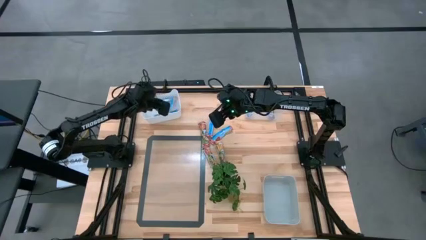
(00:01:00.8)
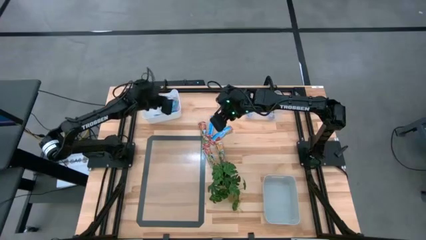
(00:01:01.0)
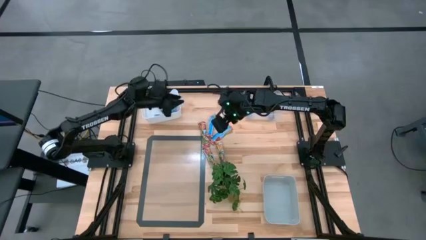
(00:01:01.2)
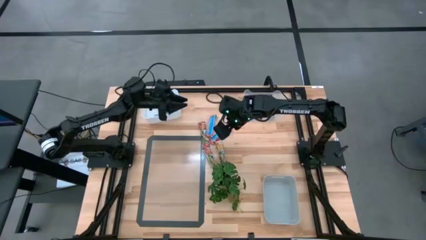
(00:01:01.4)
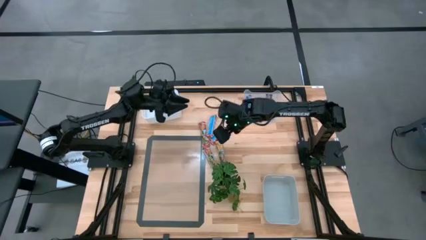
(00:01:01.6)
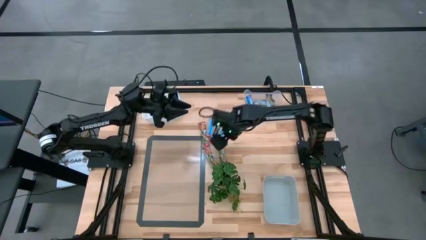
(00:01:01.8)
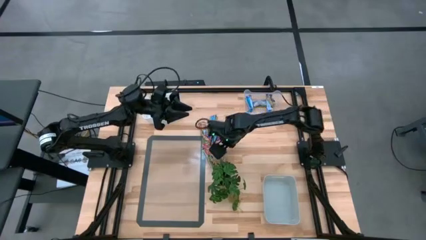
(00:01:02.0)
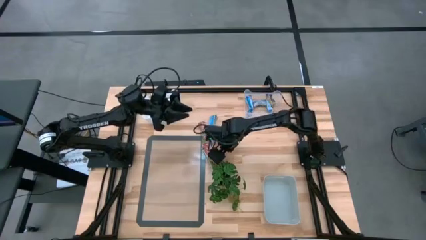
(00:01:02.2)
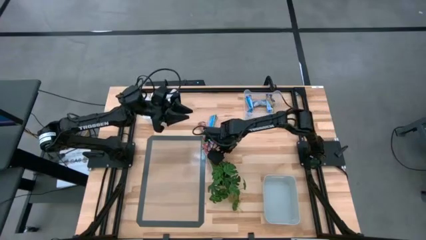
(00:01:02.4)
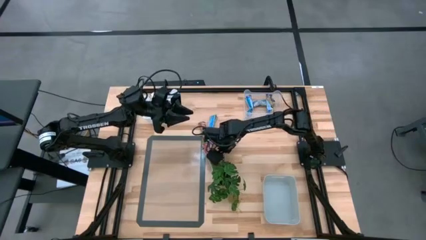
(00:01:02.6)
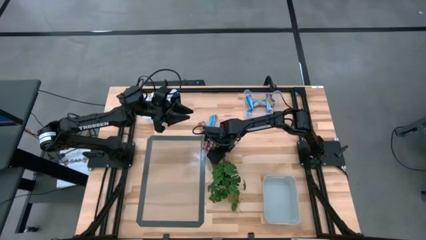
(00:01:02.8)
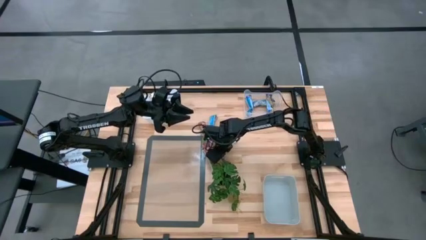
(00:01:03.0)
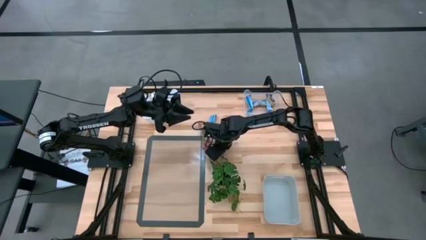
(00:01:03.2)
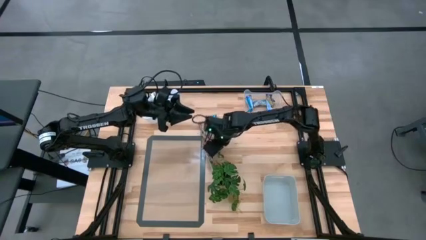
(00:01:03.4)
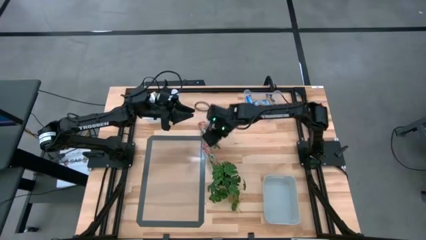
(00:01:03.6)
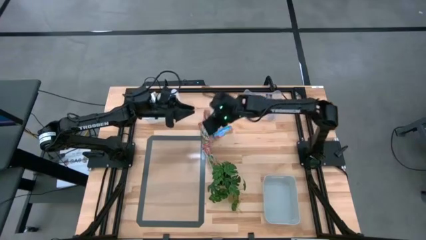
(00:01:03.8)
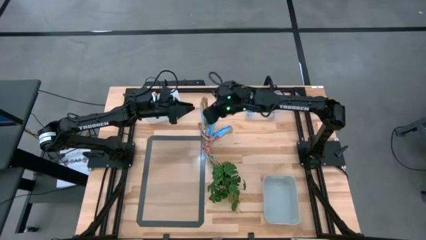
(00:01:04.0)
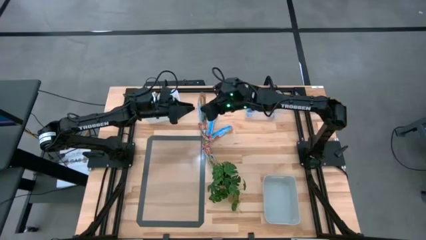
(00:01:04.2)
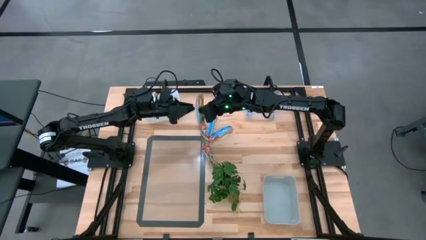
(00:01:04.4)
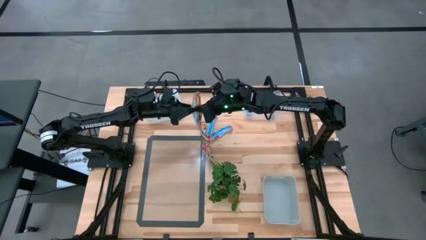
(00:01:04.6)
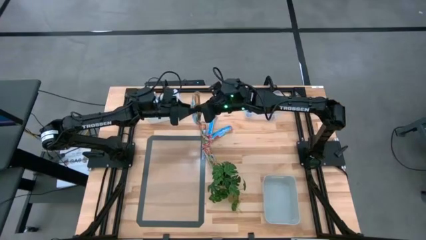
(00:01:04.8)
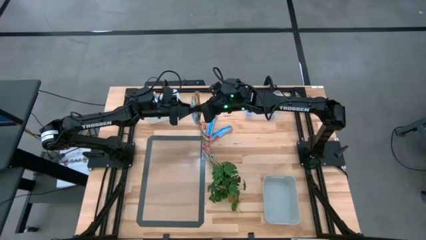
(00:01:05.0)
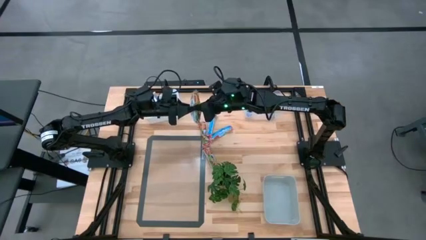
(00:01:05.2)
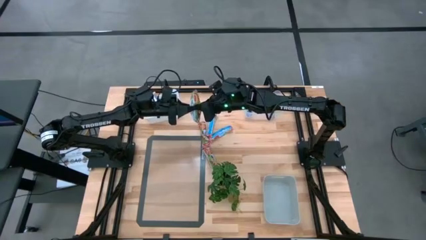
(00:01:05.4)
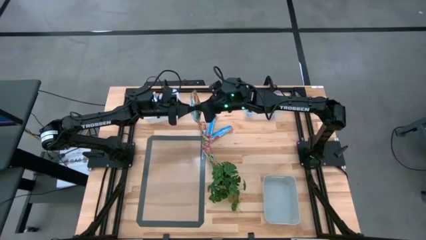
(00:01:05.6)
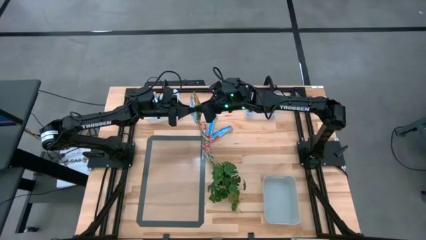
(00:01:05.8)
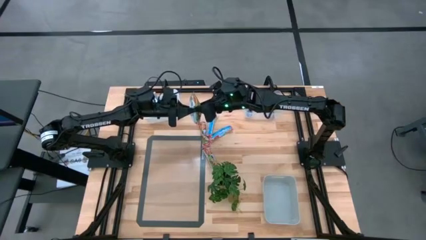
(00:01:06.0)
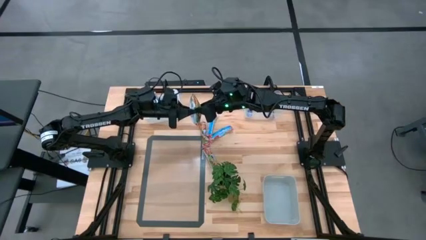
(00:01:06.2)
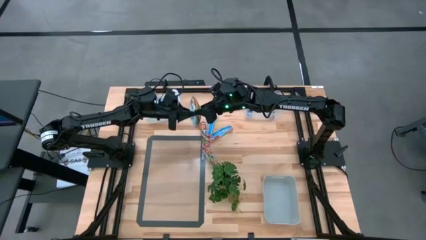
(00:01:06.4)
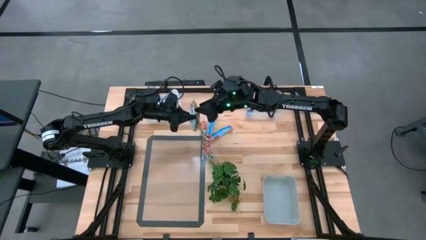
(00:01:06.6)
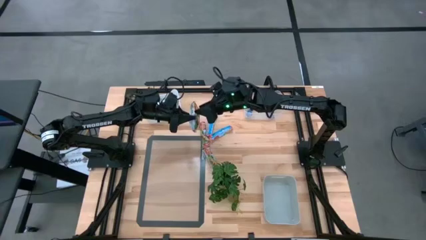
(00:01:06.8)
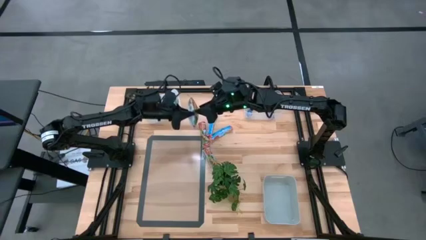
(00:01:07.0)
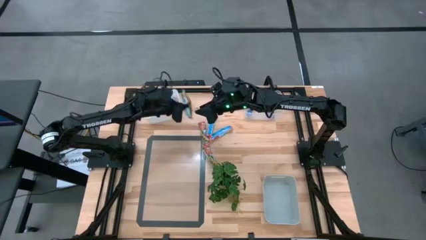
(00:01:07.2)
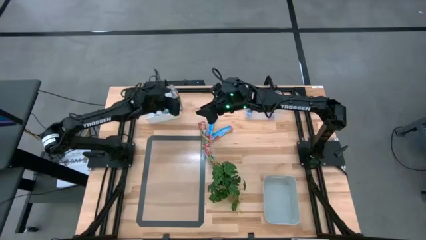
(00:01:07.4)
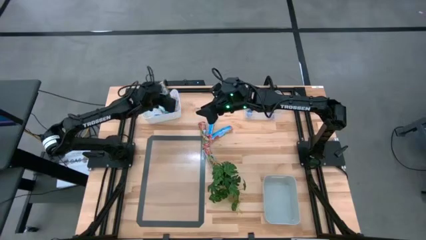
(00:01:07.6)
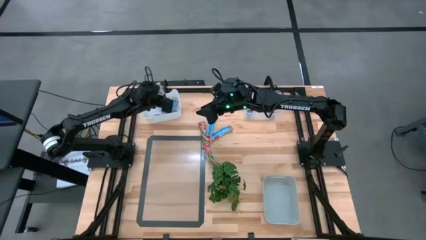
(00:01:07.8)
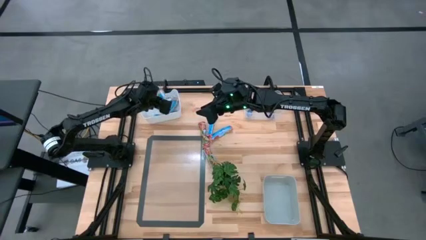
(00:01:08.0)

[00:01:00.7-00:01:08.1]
Task: Pick and place Granola Bars by type
Put the yellow granola bar into the white bin

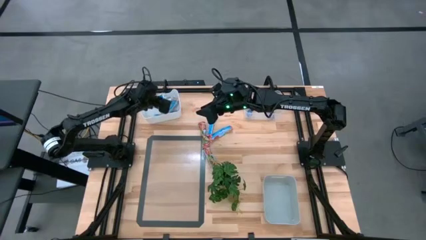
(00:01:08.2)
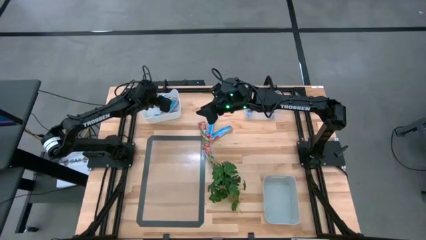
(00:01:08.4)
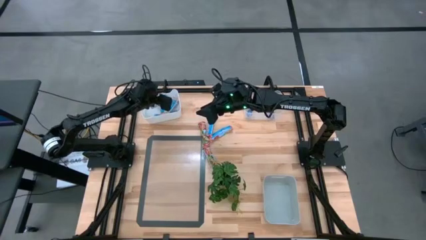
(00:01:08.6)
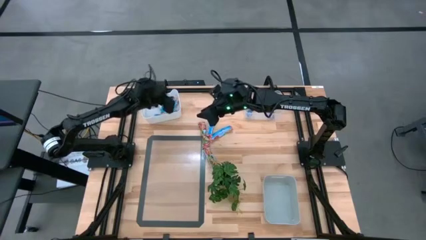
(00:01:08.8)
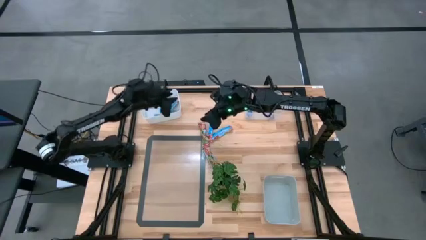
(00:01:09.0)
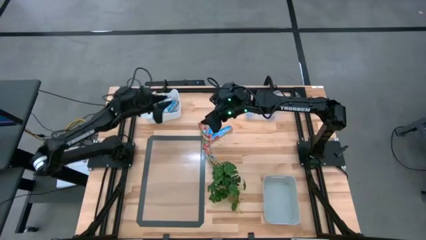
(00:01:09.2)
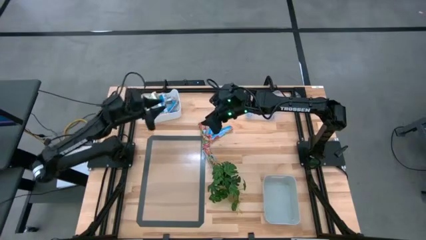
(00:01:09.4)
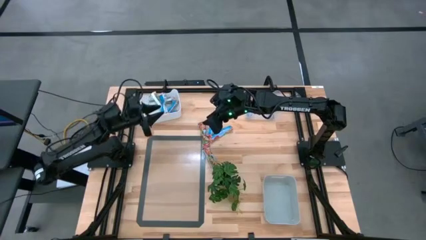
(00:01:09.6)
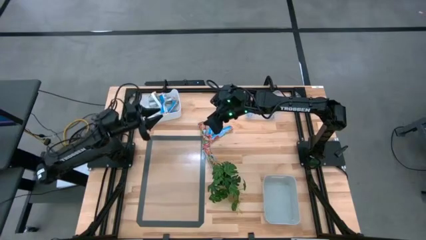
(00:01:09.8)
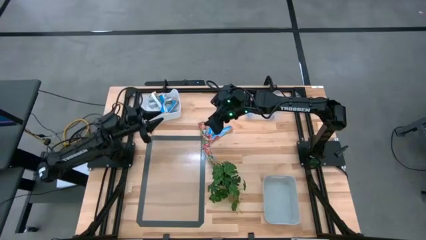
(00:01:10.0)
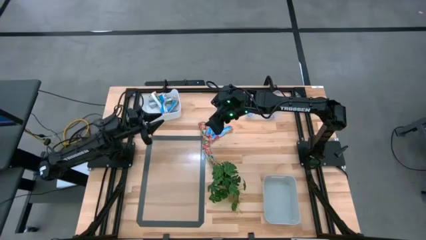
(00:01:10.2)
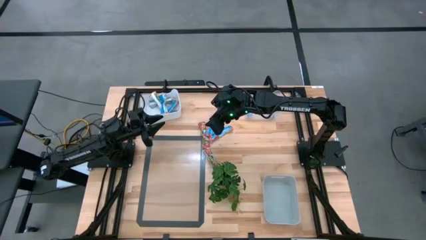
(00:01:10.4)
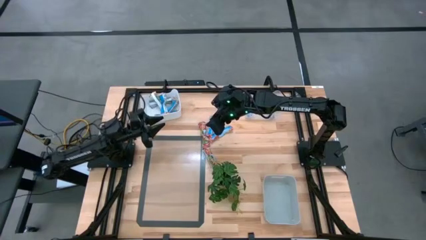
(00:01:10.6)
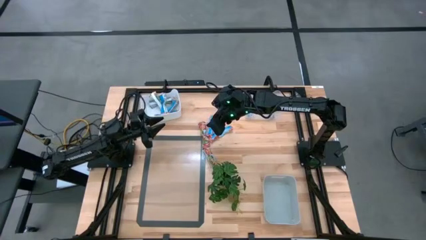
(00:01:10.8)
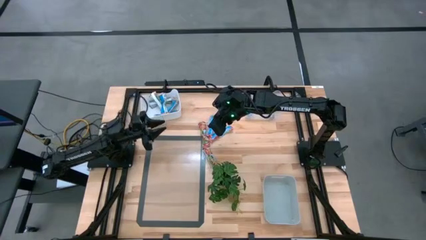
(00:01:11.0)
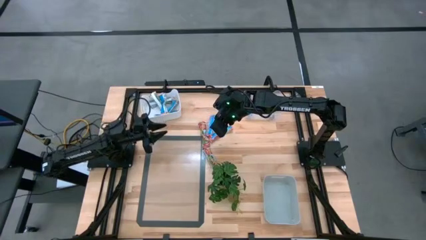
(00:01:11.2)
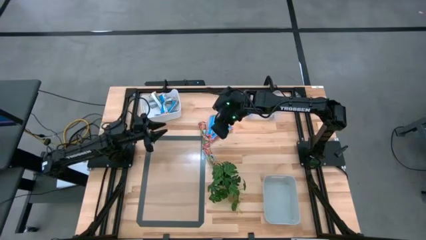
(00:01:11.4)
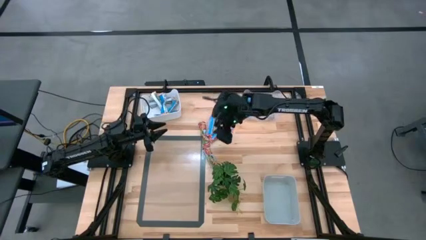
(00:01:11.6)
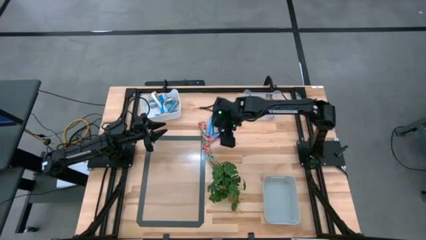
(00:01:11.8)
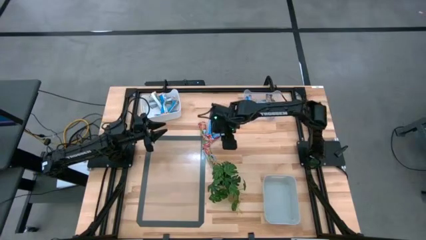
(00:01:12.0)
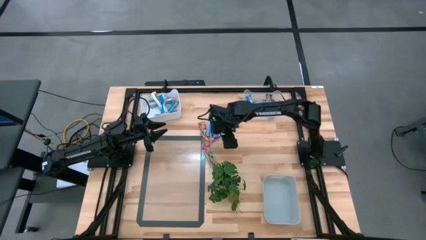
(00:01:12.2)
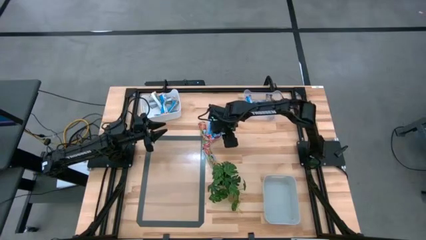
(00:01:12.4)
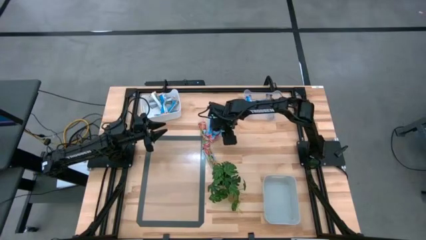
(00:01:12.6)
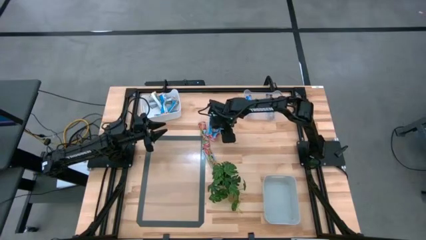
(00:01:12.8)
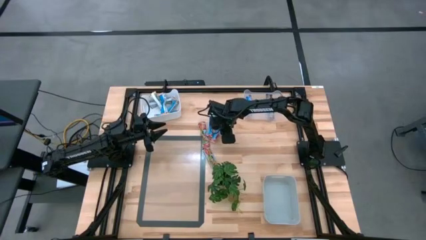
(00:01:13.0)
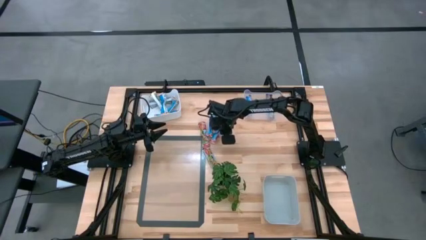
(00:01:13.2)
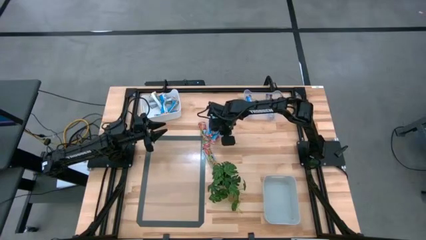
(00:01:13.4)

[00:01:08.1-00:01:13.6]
Put the red granola bar into the gray bin

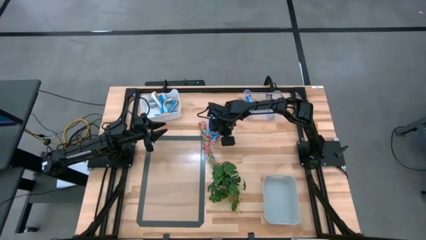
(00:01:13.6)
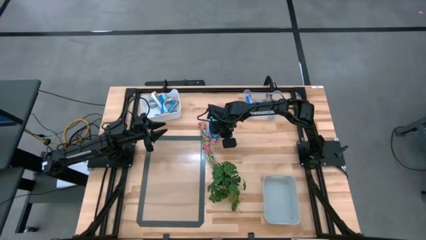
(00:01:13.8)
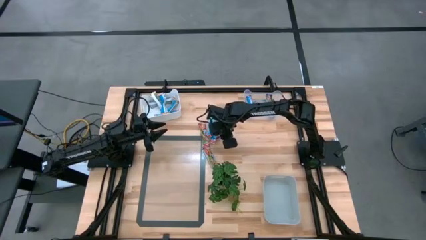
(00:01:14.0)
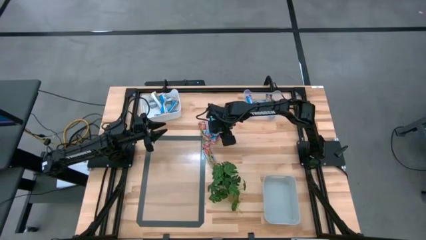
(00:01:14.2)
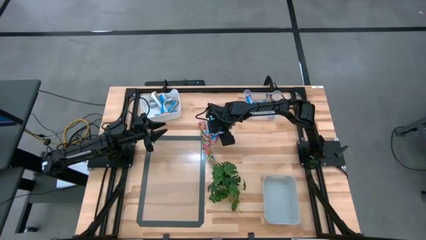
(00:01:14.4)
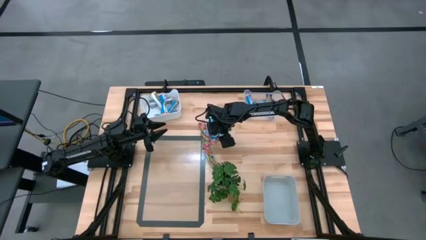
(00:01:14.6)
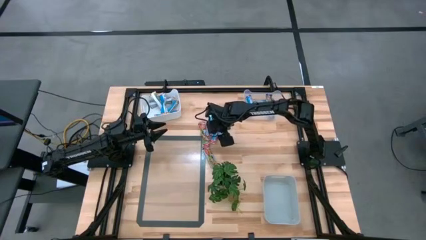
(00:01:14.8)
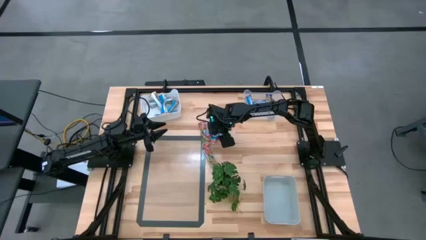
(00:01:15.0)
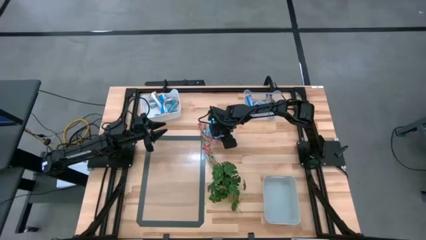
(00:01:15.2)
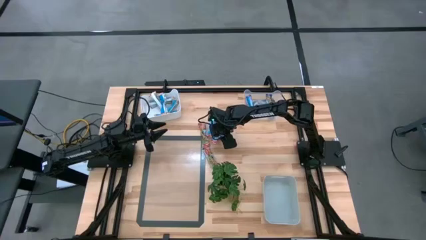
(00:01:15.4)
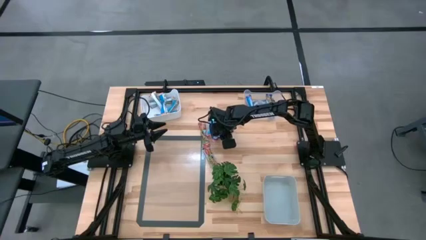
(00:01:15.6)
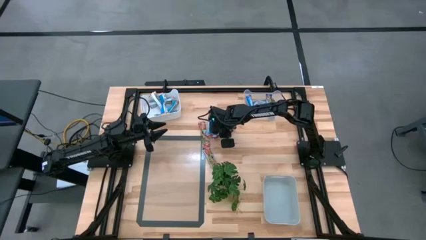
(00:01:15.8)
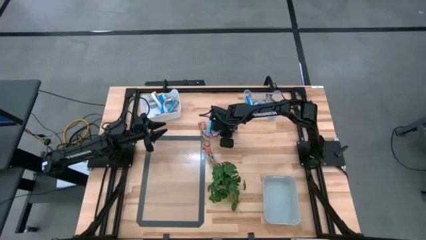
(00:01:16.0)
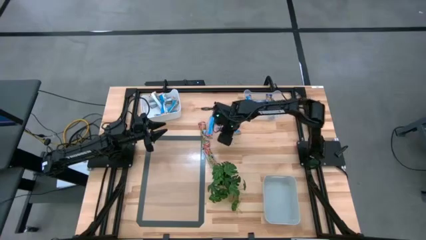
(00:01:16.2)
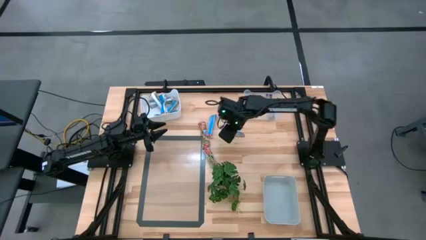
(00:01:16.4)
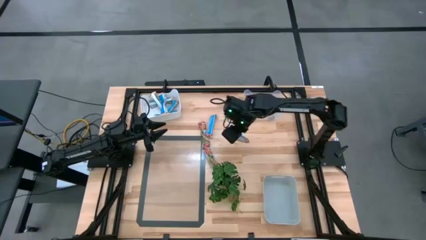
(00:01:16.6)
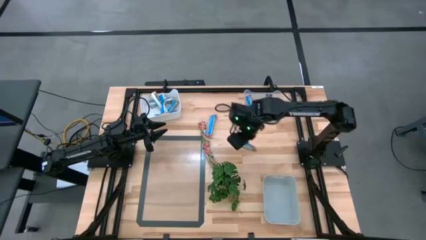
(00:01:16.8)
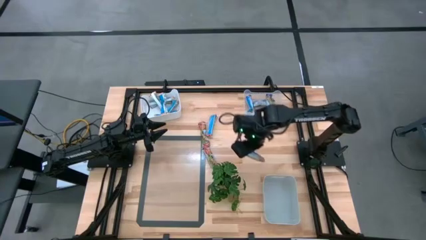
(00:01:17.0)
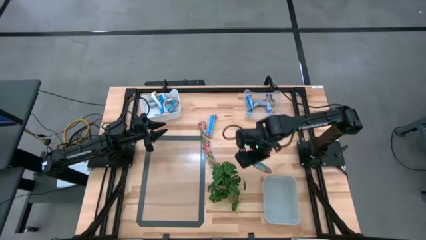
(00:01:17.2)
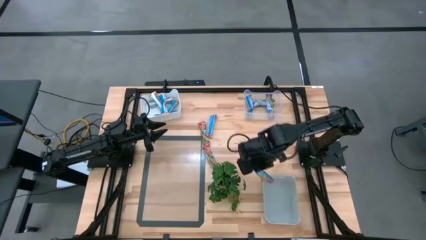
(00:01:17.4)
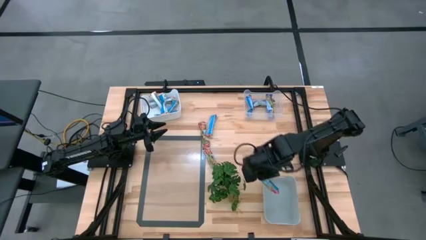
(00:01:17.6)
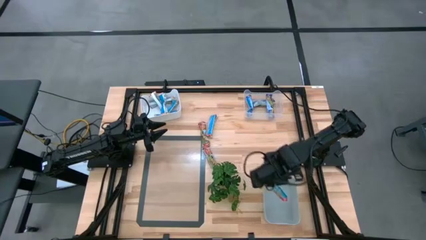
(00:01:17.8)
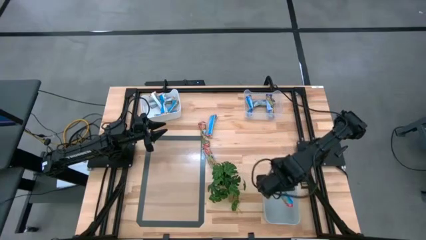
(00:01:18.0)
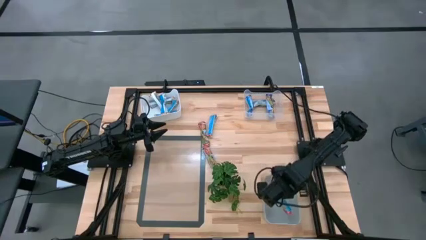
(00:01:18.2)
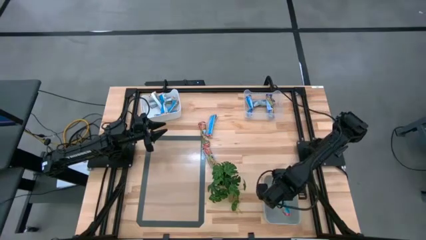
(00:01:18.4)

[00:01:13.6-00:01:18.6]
Put the red granola bar into the gray bin
